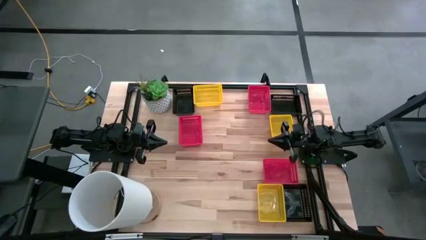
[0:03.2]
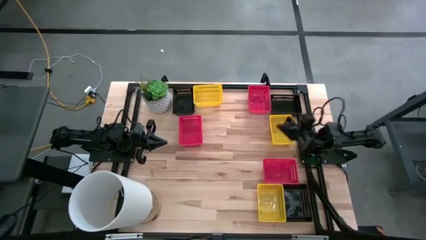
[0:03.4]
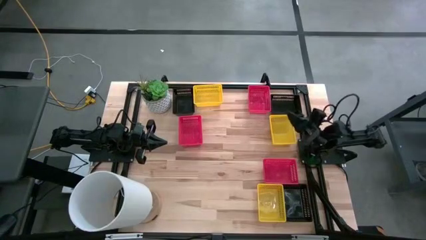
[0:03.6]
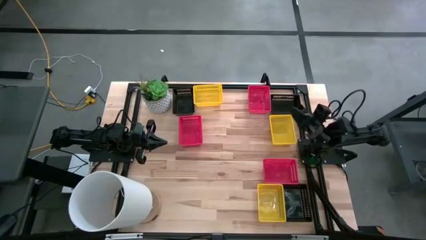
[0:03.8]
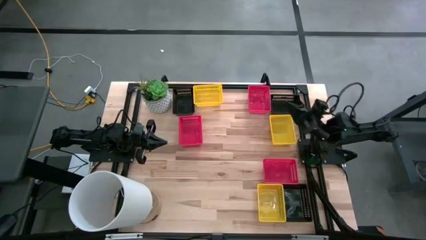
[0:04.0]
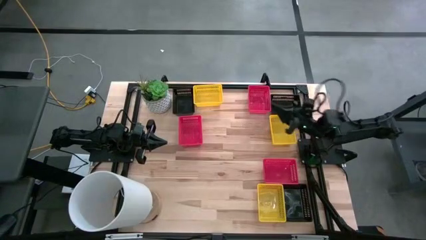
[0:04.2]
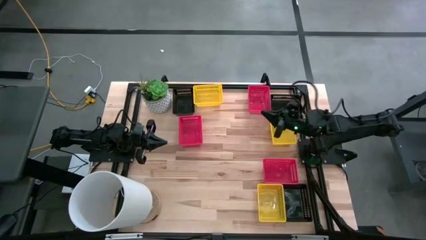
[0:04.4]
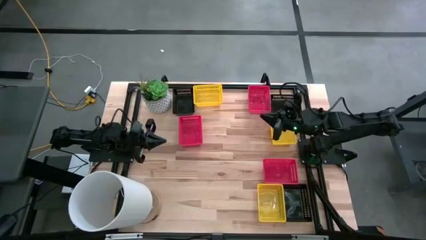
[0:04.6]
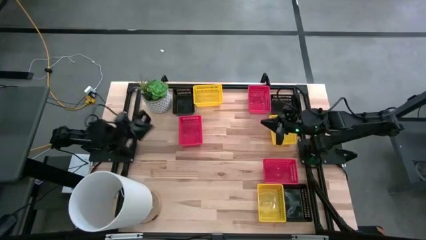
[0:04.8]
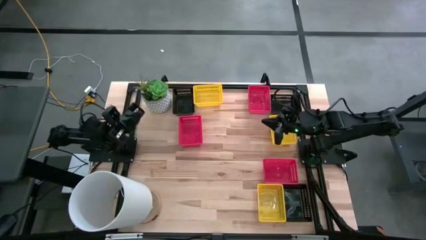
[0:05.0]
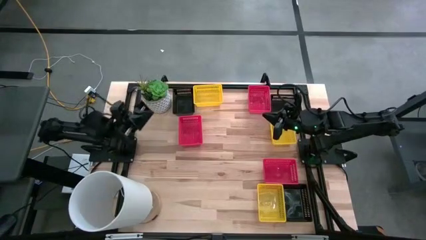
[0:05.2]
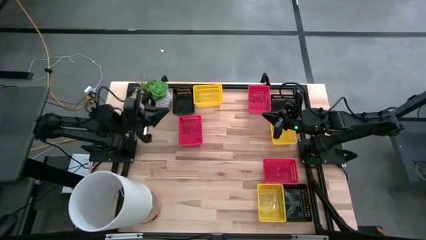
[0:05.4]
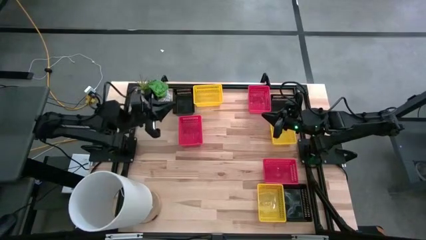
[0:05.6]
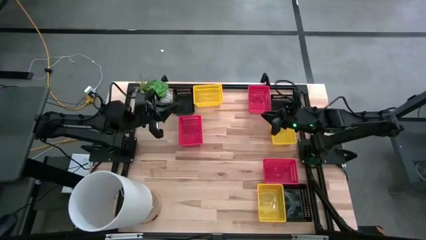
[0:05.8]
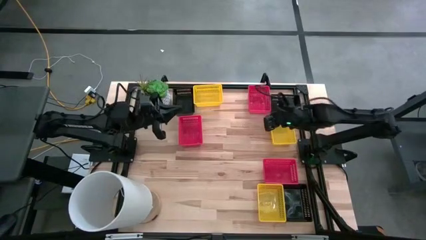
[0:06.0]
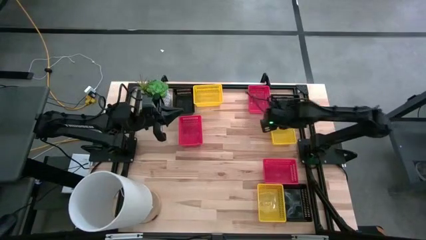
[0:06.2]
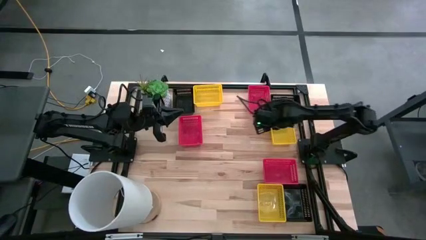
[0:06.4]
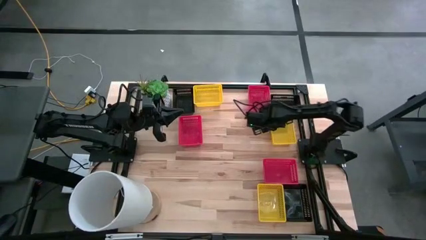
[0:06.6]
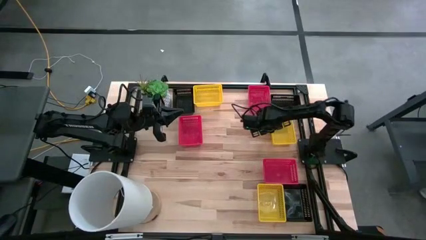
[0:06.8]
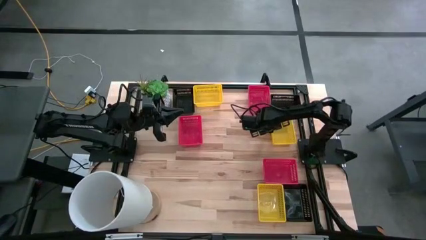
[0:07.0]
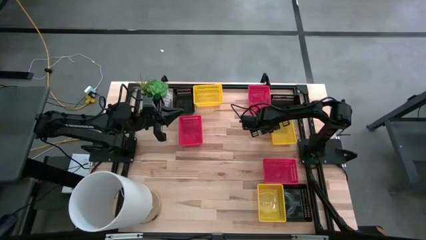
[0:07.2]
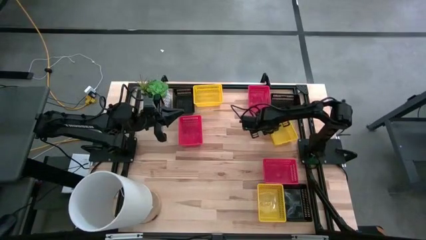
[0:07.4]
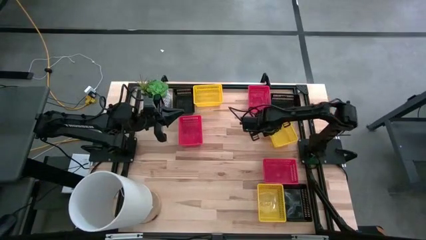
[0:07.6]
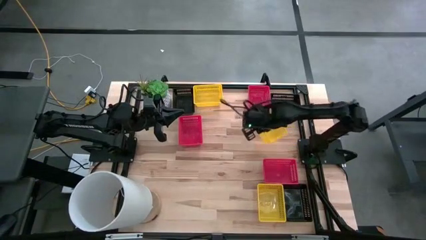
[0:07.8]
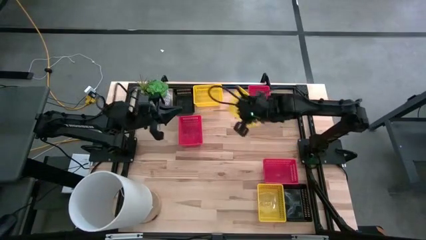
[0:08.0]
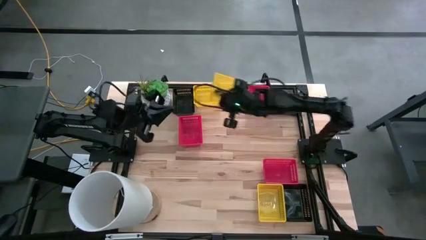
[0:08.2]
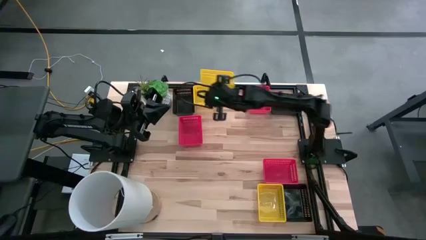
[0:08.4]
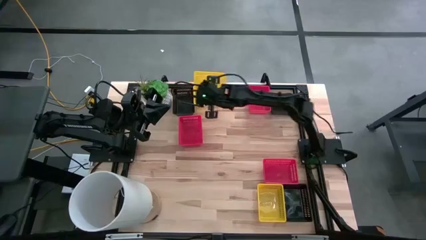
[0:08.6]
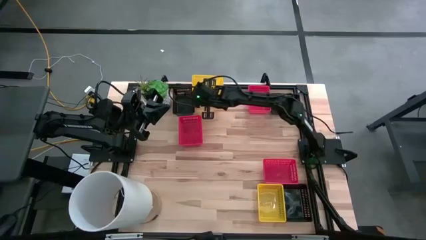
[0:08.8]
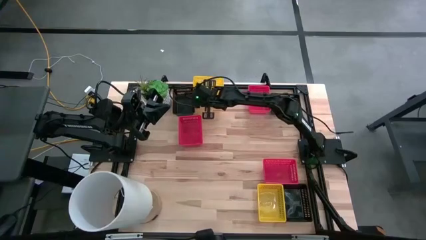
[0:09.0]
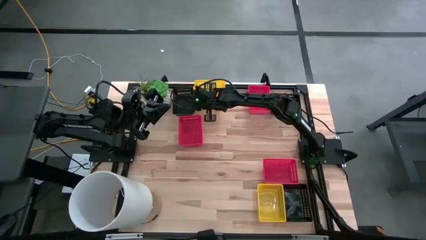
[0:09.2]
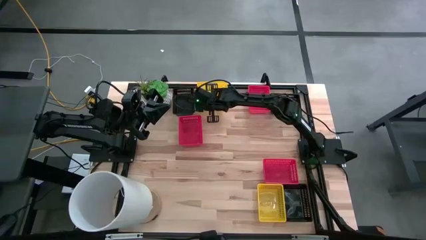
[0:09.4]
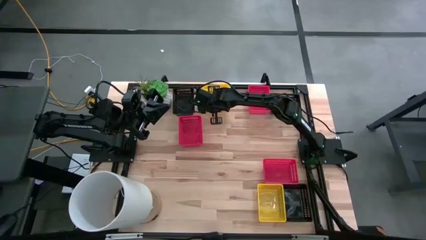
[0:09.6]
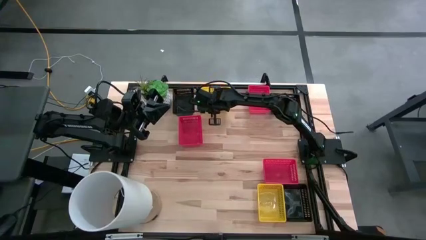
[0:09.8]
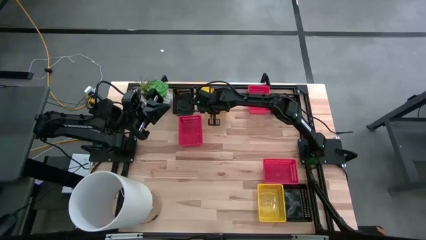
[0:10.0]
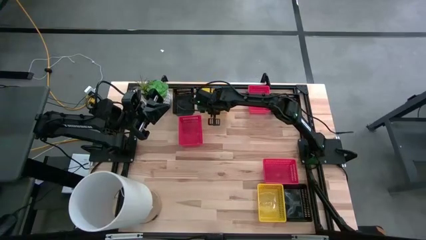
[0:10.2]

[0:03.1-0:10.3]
Stack the top right yellow bin on the left yellow bin

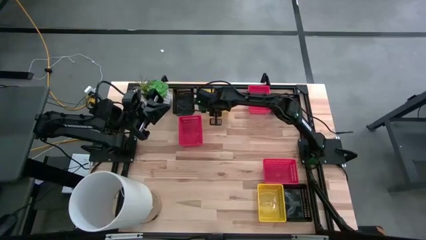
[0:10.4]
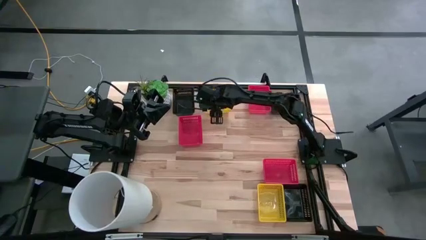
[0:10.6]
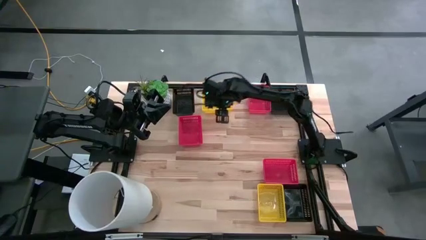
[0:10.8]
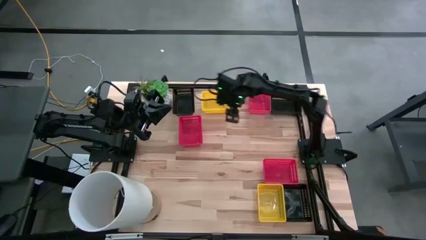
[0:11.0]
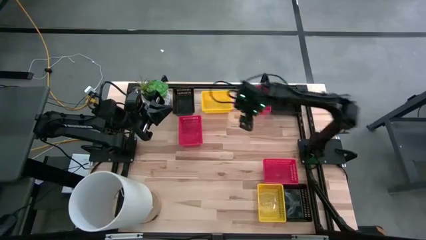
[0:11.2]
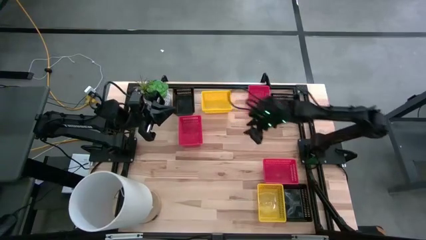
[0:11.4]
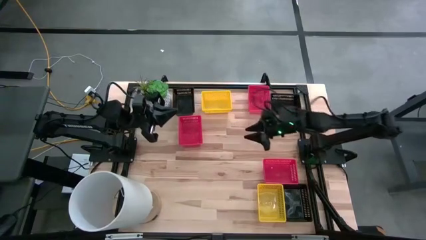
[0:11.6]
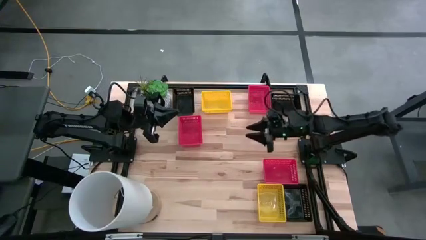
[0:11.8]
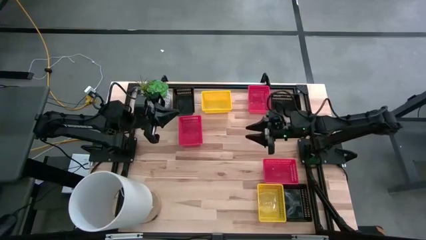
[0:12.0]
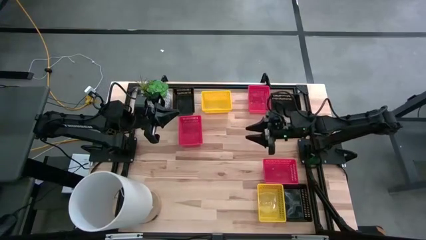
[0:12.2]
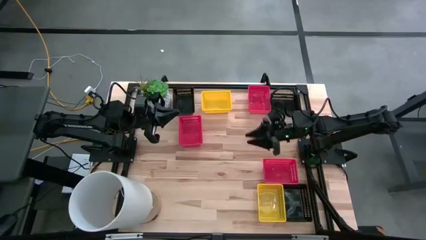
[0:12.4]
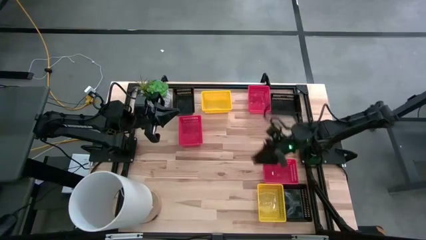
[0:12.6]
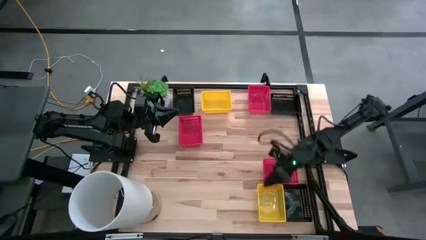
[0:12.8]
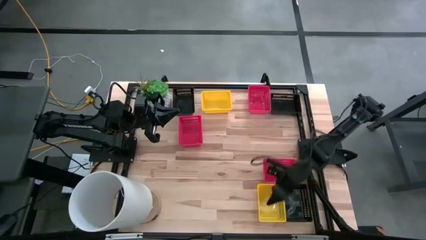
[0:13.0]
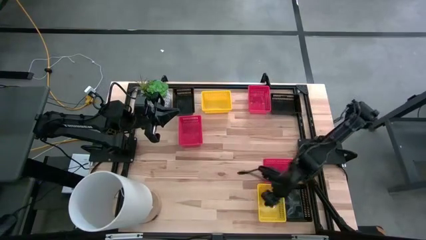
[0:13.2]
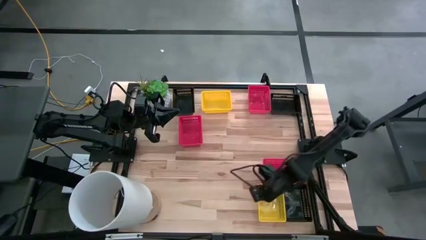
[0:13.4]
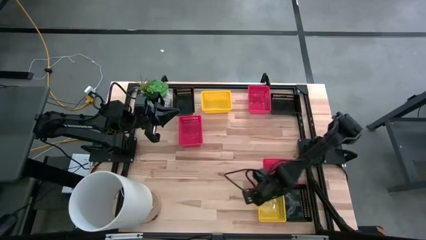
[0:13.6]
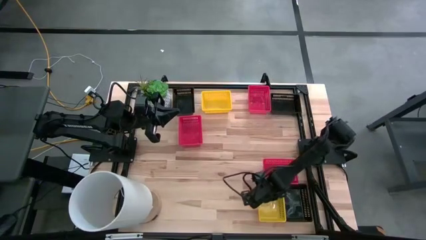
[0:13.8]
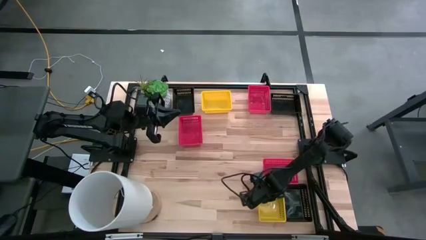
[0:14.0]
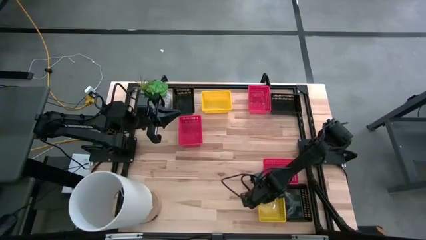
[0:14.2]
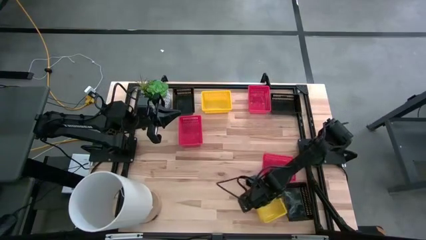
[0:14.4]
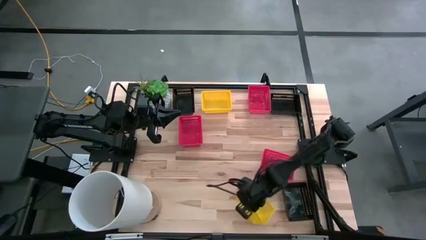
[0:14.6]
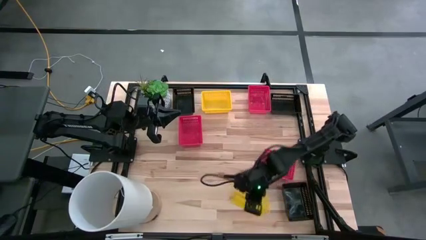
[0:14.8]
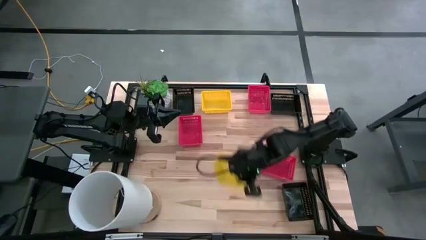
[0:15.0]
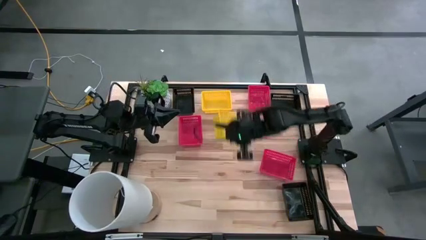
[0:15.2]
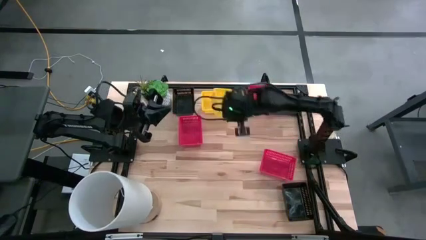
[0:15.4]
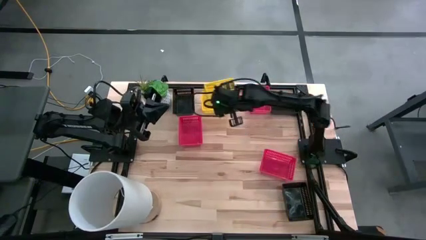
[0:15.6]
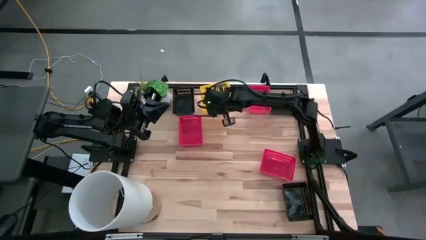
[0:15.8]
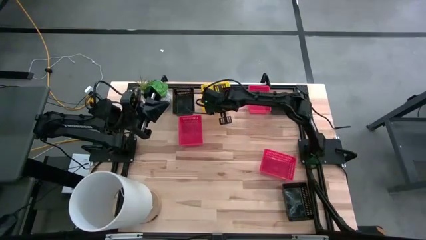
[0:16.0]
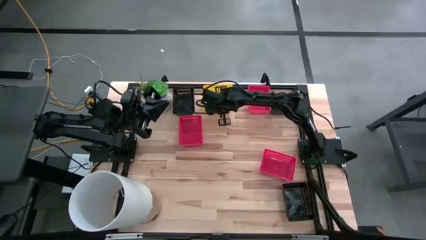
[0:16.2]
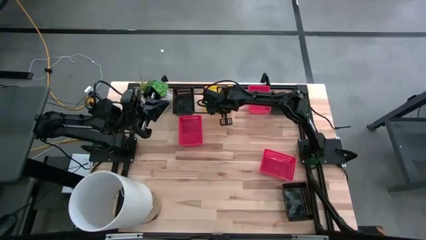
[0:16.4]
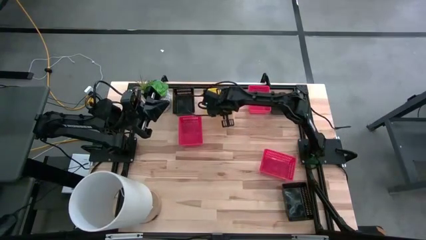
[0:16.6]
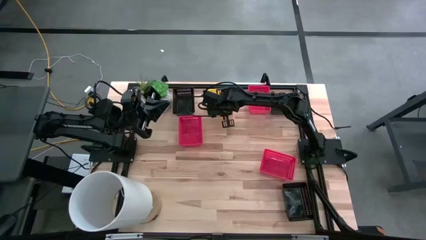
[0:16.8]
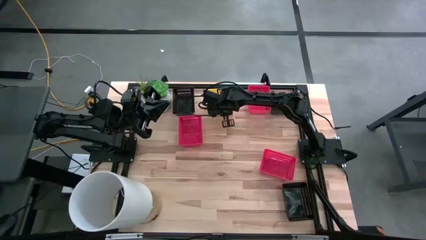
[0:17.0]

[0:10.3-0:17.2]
Stack the bottom yellow bin on the top yellow bin

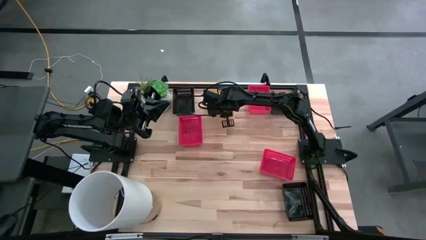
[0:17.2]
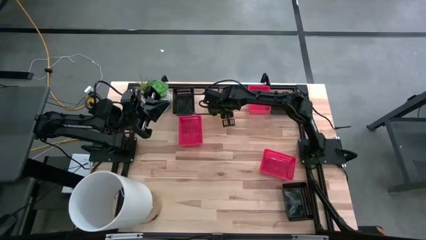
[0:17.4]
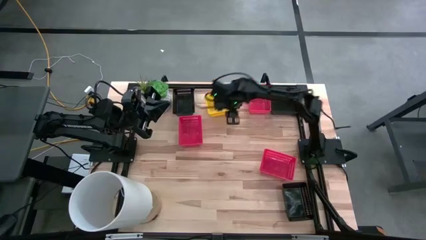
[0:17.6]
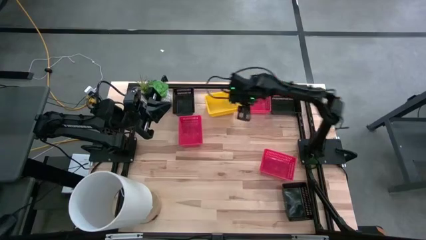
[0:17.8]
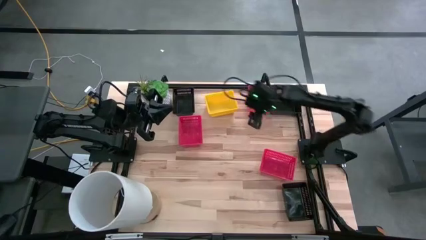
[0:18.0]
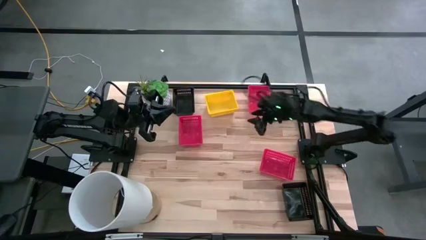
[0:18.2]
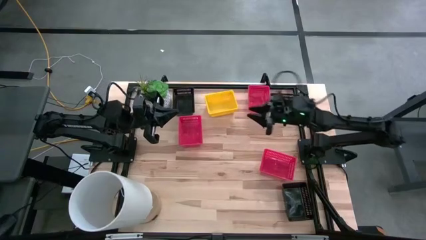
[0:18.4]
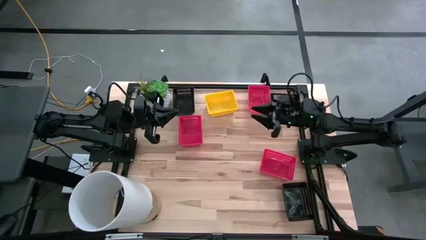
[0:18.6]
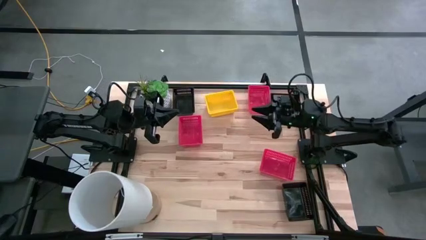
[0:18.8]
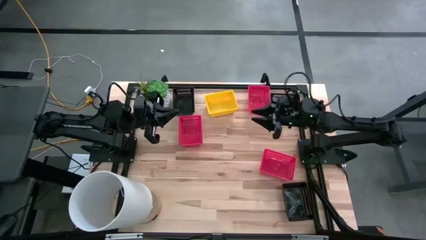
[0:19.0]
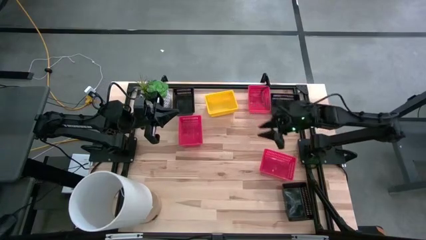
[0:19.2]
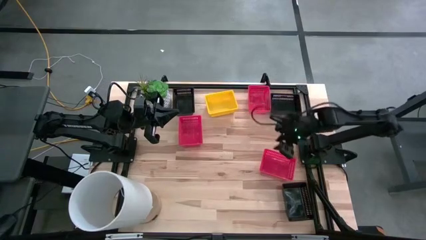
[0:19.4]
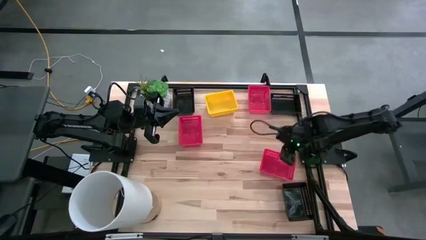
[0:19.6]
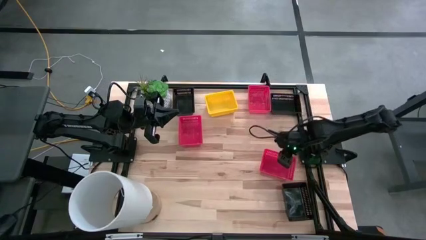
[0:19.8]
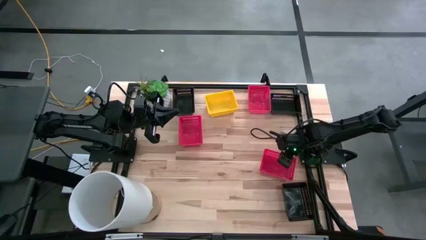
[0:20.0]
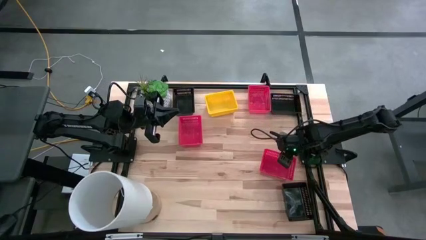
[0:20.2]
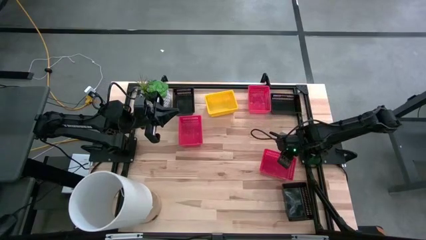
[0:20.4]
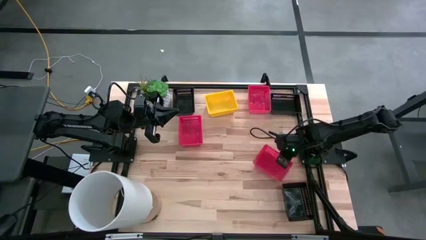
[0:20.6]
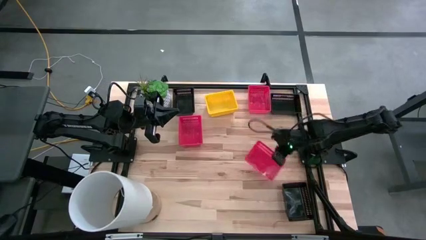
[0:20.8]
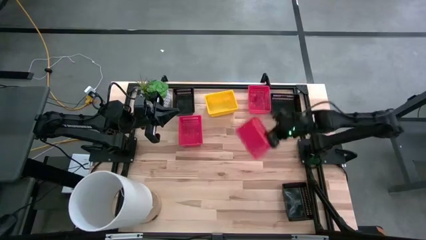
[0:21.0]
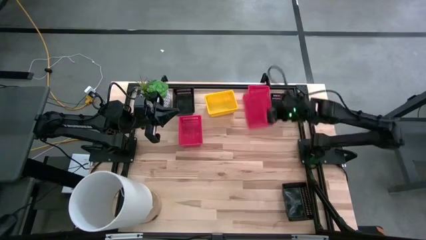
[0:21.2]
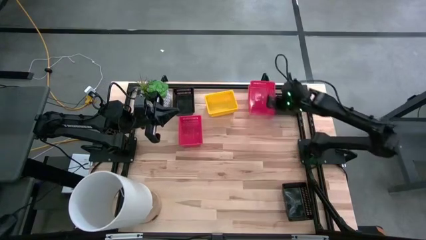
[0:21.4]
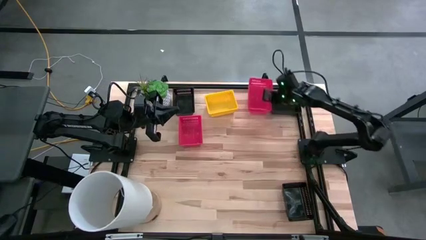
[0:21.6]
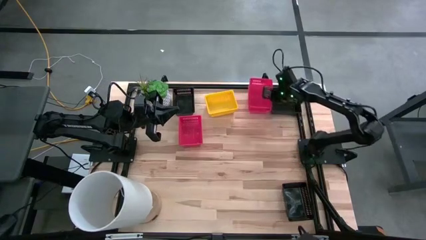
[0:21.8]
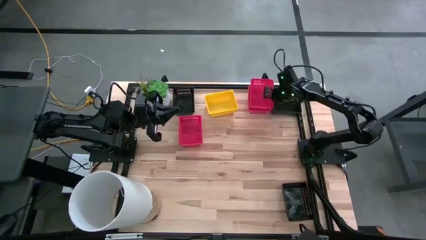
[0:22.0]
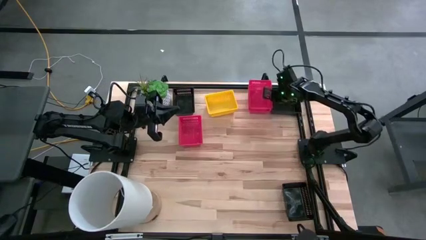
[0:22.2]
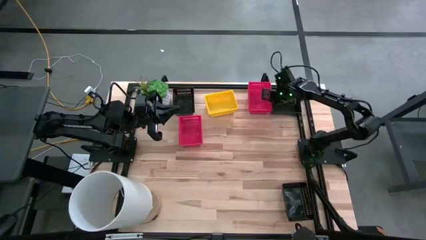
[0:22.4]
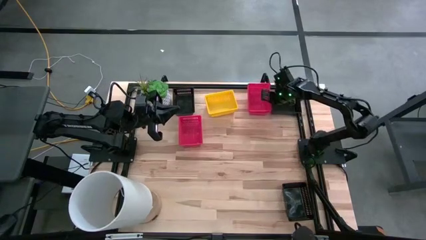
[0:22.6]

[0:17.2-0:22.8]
Stack the bottom right red bin on the top right red bin
